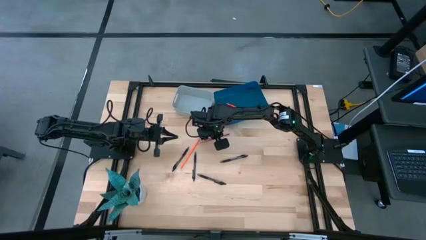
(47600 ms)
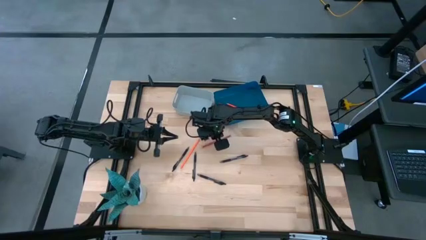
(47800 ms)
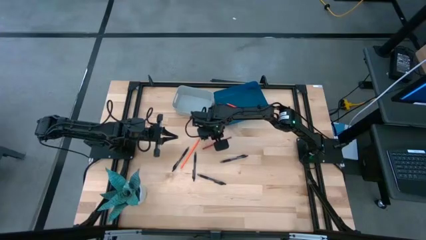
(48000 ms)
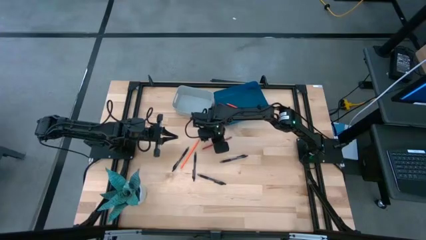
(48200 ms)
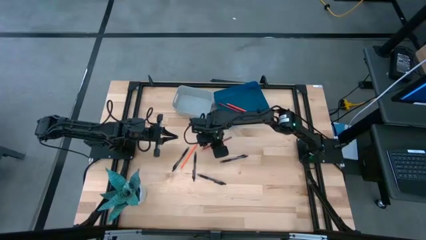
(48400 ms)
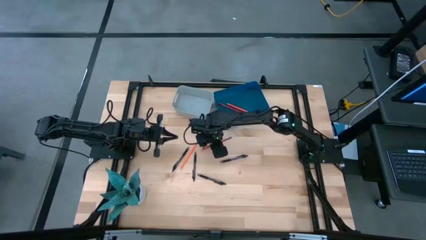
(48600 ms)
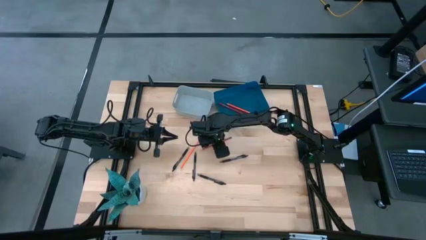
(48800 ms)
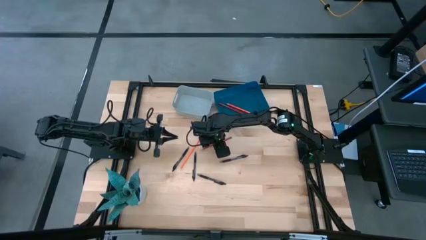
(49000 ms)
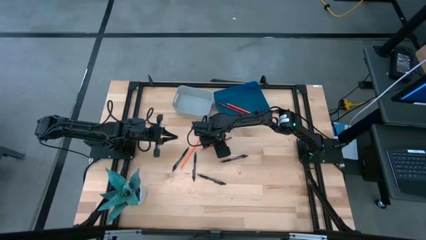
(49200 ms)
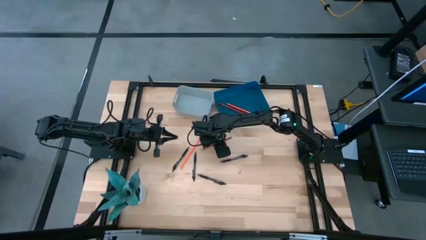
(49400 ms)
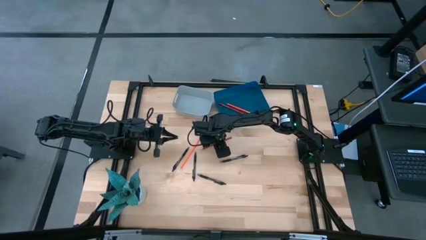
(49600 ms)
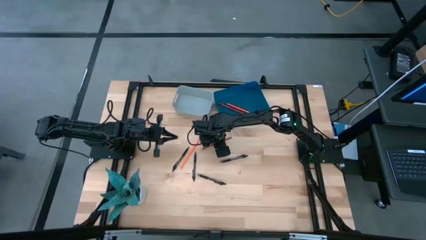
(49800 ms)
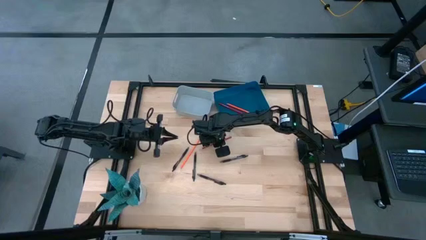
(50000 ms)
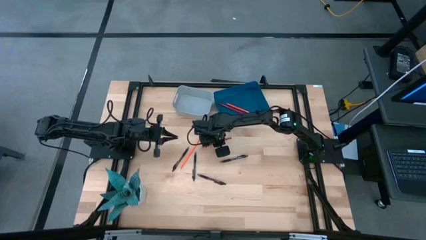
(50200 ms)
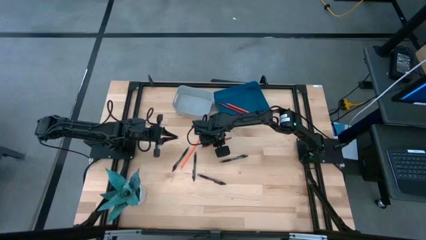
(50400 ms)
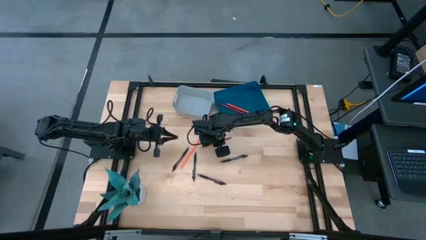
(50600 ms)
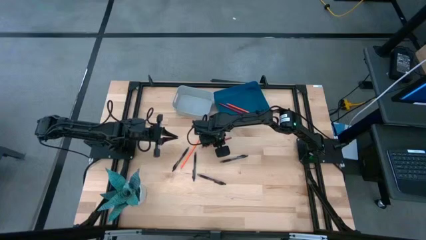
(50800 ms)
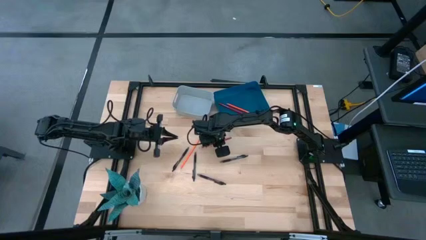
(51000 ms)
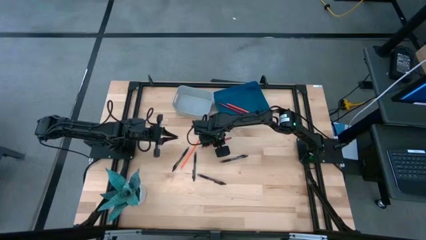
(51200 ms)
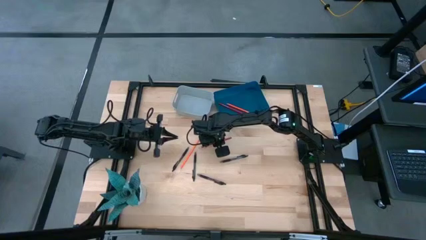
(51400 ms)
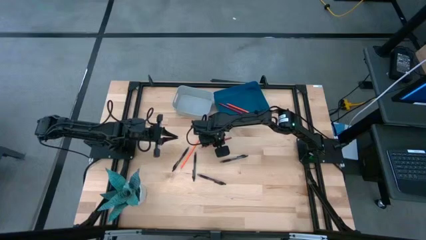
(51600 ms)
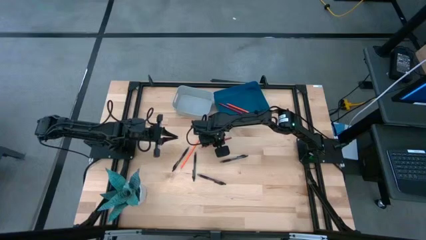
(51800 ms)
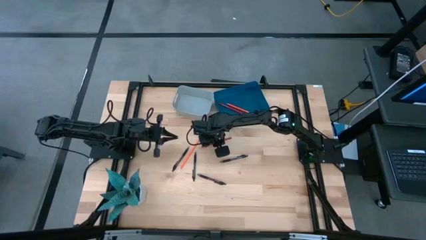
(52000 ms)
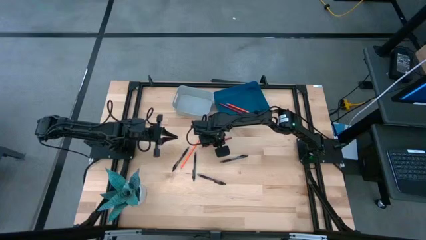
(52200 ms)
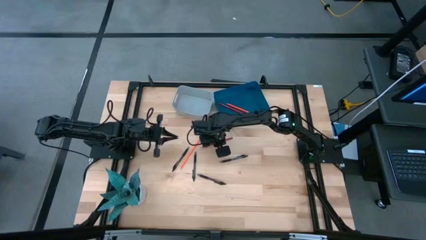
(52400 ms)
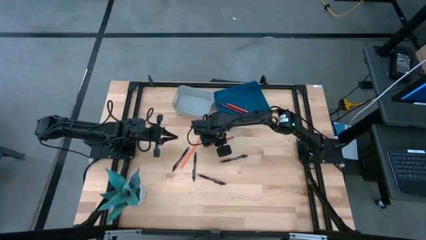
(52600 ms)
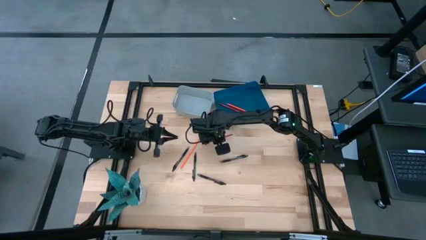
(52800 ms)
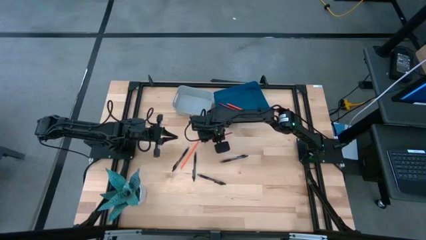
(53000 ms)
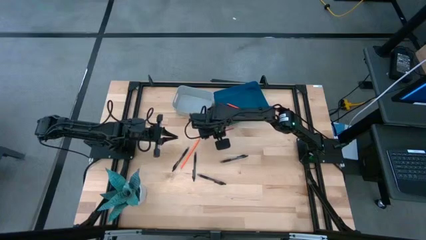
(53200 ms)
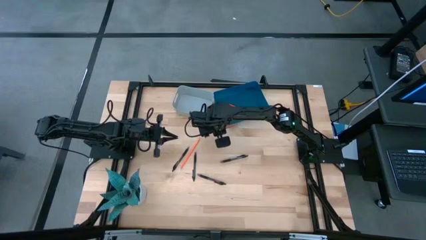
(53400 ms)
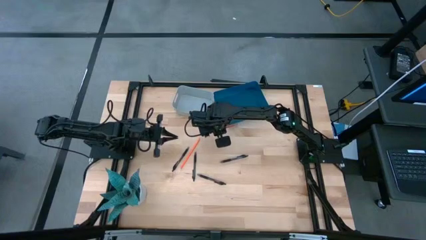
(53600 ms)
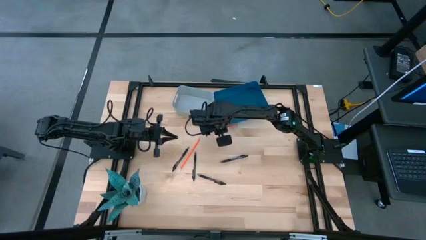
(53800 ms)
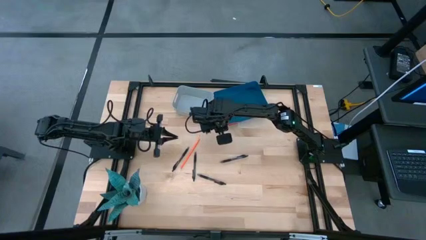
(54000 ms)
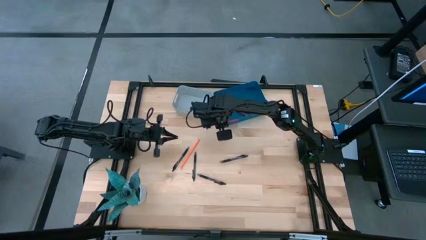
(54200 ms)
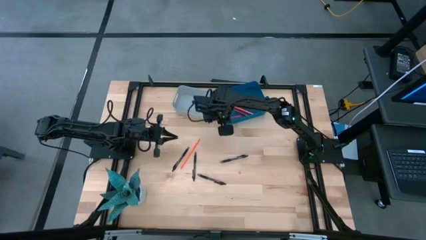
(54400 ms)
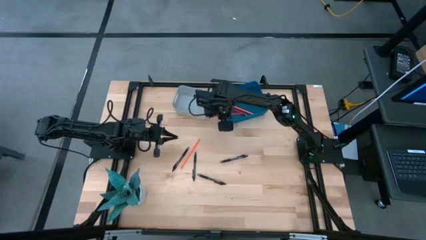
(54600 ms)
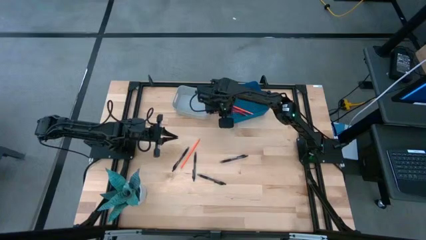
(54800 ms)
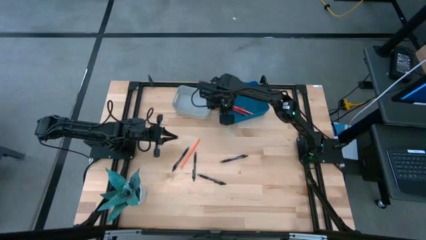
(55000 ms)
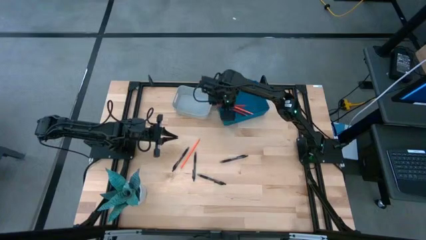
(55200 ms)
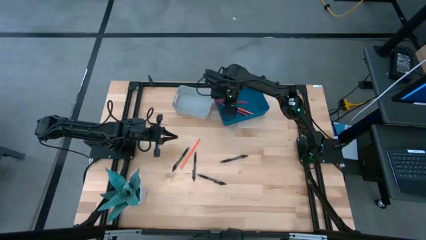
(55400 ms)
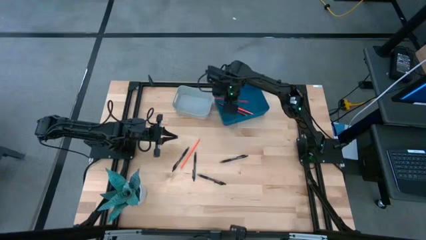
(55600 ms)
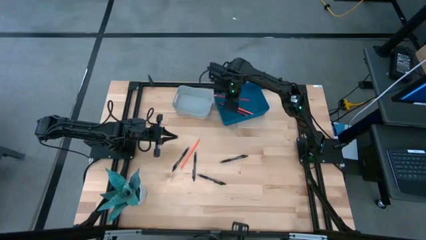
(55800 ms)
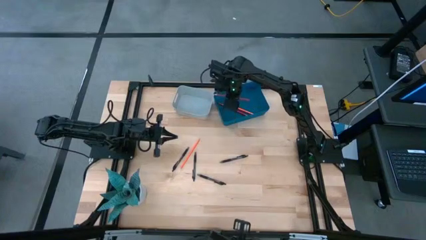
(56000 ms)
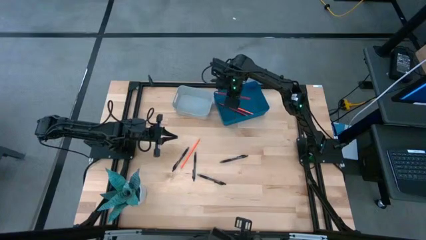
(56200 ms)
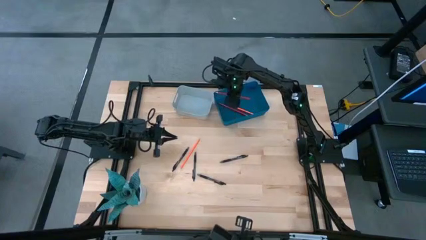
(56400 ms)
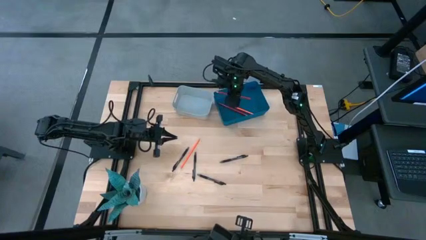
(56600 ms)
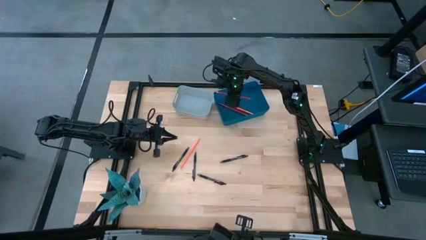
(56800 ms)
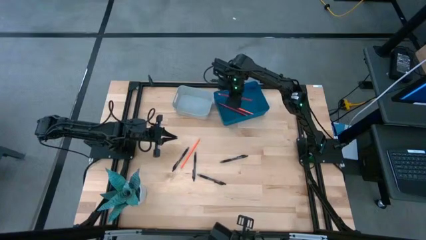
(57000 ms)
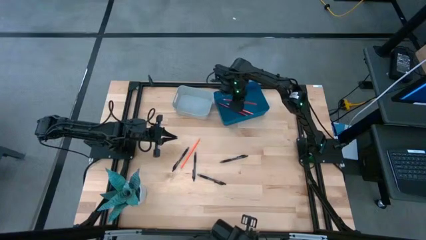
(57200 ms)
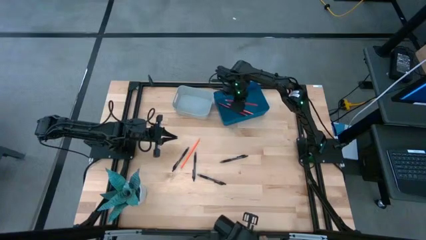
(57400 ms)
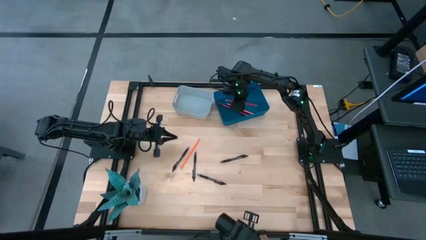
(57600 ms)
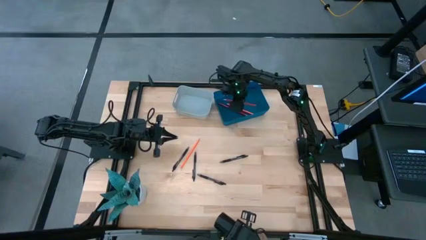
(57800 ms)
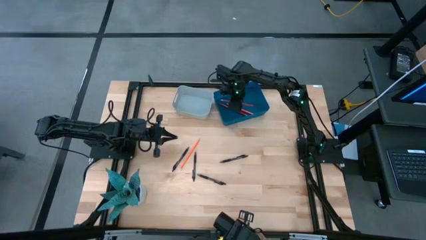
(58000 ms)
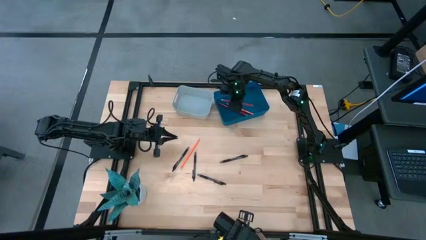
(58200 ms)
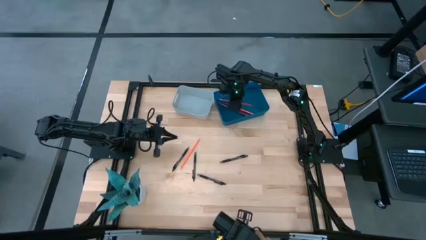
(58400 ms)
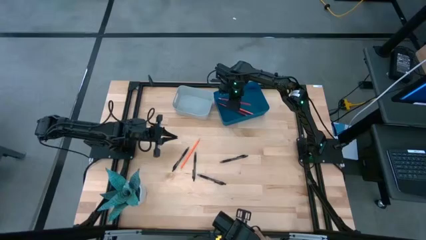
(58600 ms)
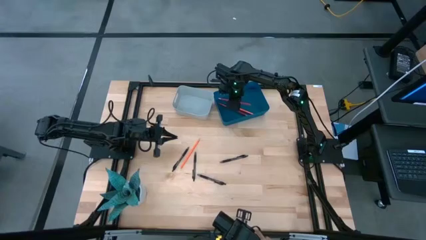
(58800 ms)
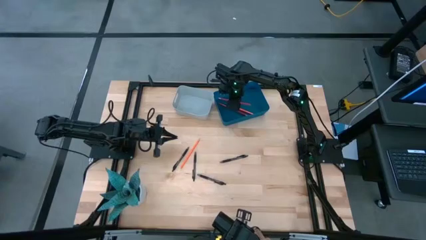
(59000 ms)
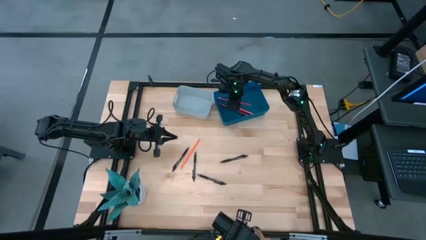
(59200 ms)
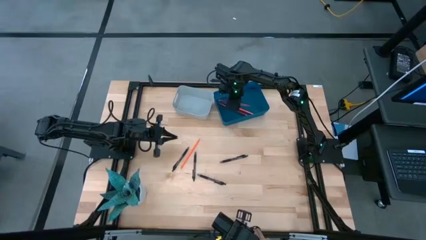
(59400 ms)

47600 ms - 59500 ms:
Task: Sort pens & pencils
Put the red pencil into the blue bin

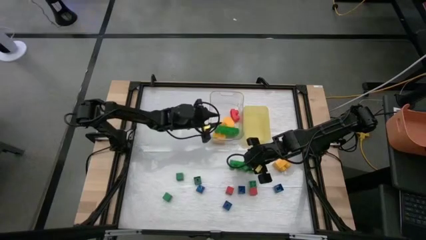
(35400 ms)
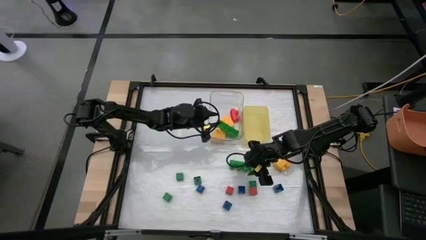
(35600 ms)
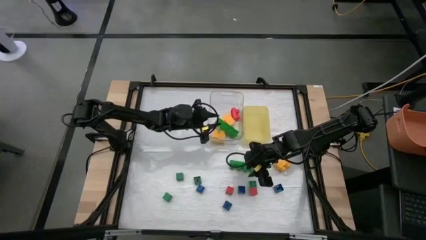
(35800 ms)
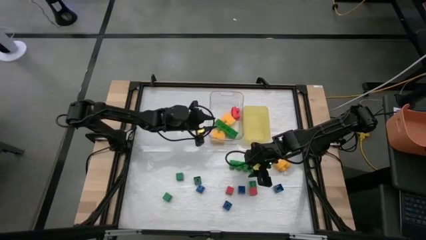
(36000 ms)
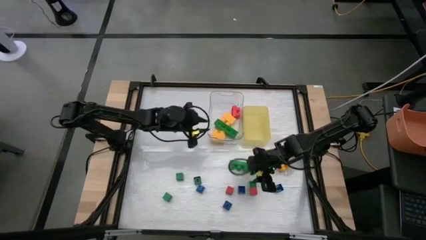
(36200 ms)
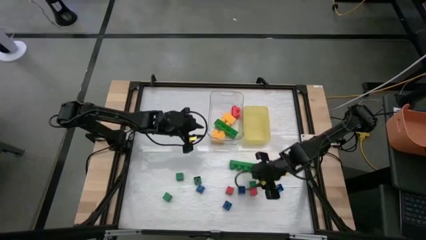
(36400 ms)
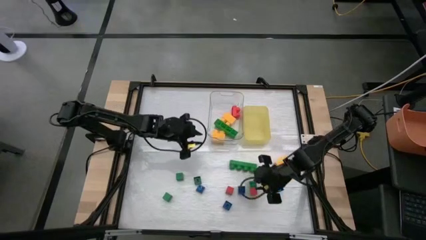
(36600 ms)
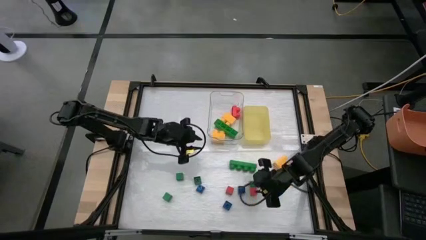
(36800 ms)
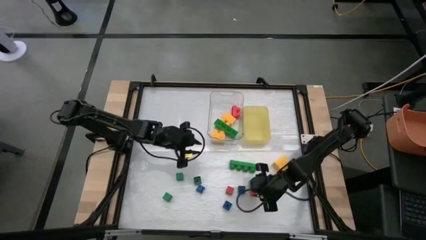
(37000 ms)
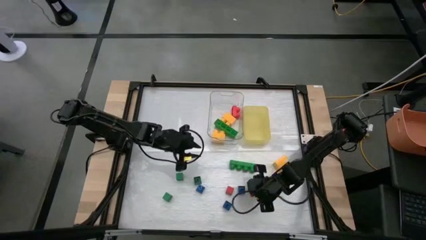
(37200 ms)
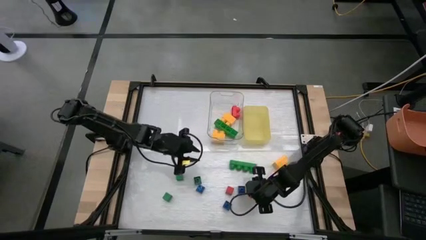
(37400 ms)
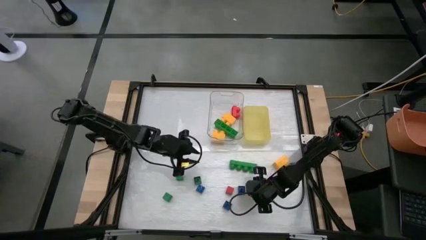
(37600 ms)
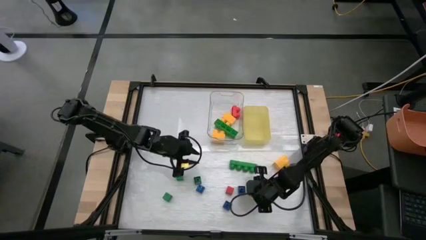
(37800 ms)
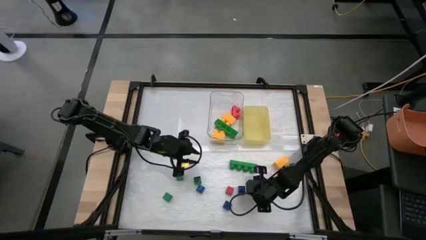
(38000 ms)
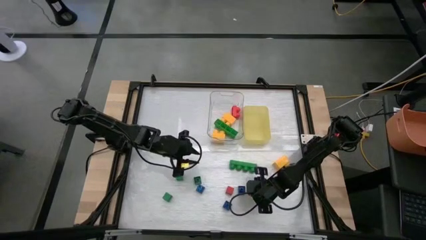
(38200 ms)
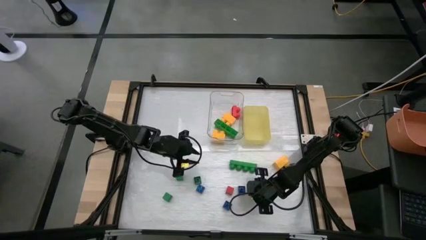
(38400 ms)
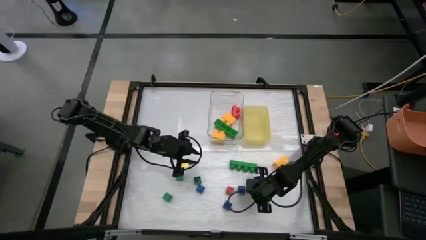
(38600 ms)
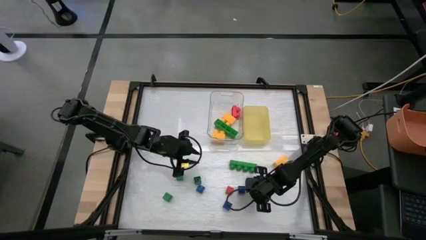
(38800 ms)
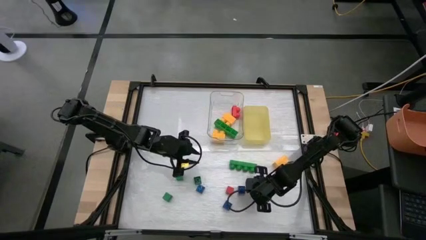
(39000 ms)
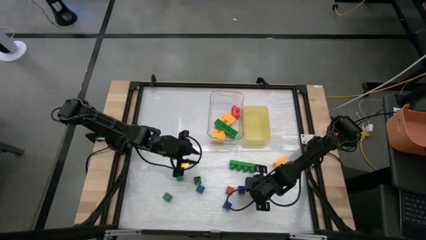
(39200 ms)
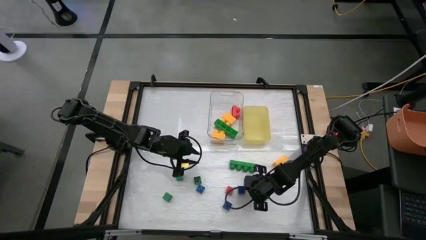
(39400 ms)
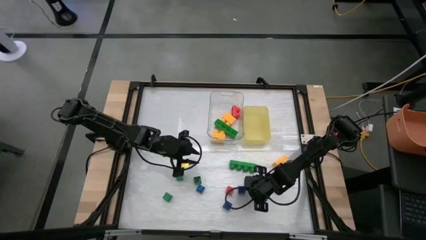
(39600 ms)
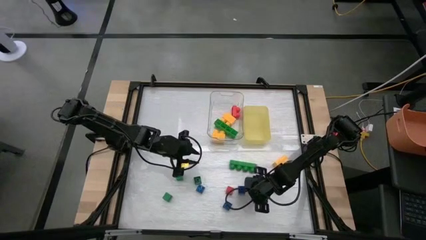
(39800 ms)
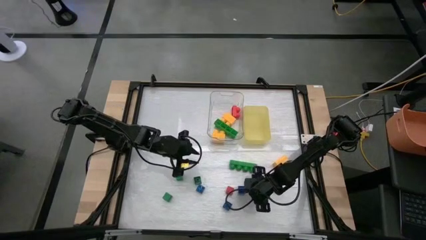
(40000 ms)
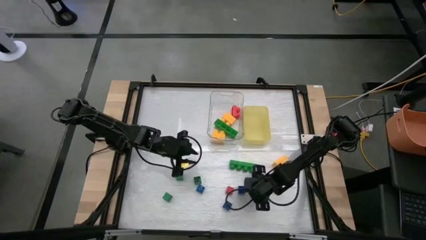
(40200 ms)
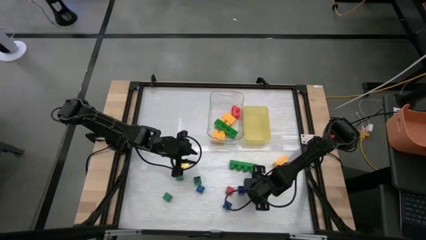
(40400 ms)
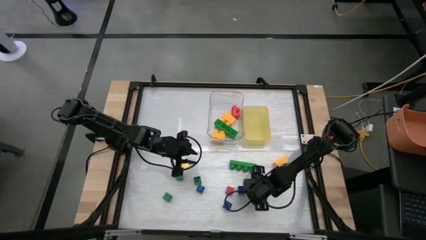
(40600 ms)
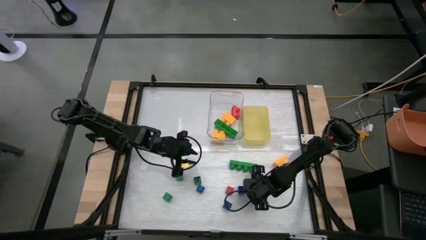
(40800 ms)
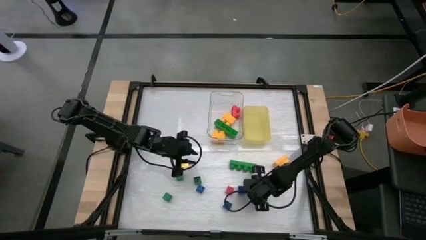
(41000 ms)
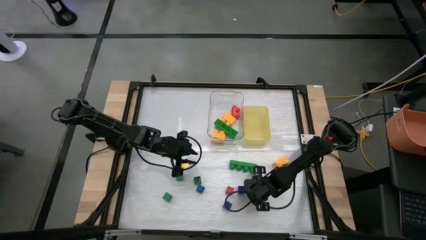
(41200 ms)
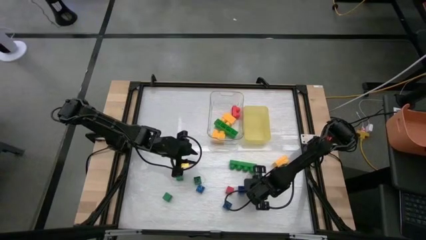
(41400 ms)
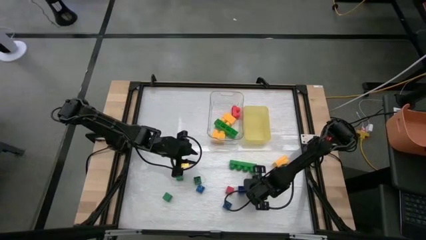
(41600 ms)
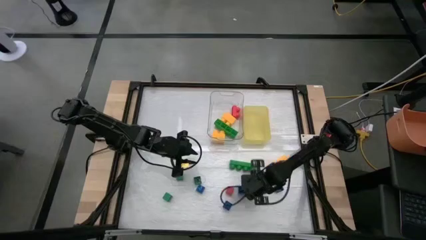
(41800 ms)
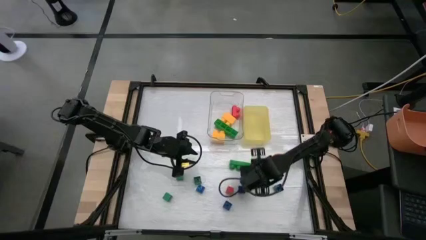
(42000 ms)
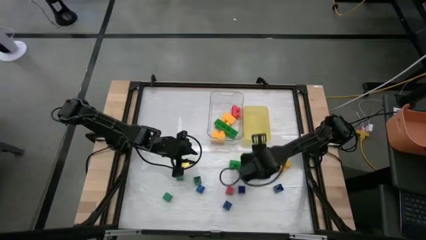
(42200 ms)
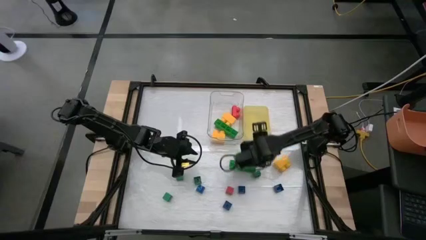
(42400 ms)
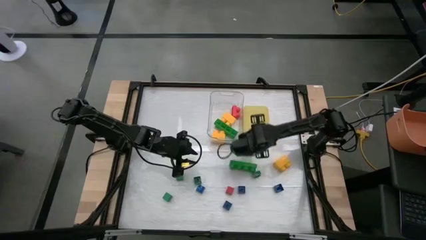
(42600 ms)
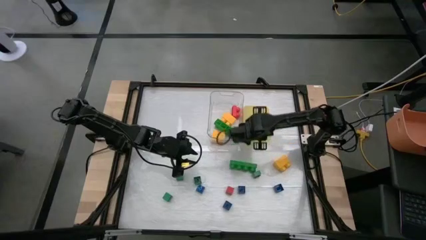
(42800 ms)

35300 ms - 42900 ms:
Task: Sort blocks by size
Put the small red block into the yellow bin
